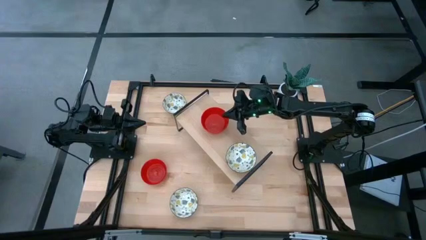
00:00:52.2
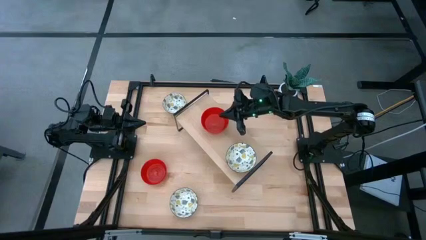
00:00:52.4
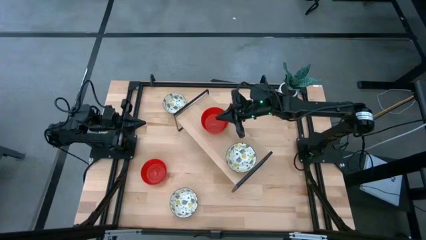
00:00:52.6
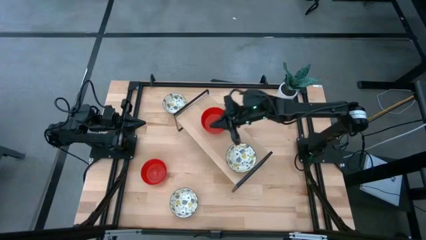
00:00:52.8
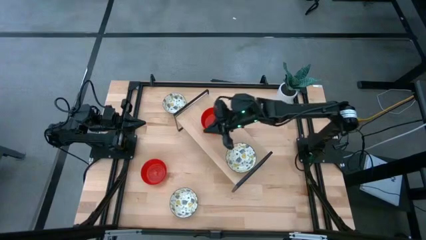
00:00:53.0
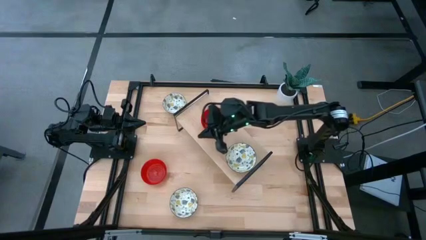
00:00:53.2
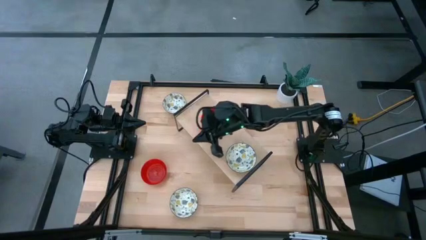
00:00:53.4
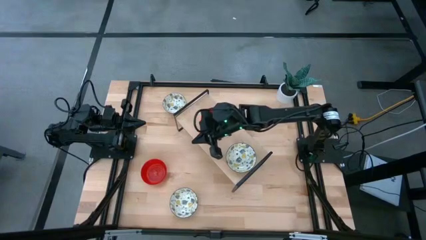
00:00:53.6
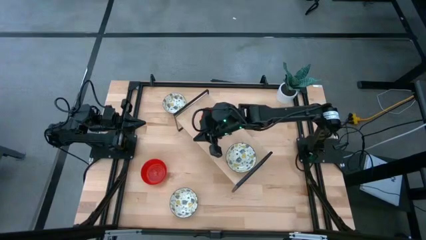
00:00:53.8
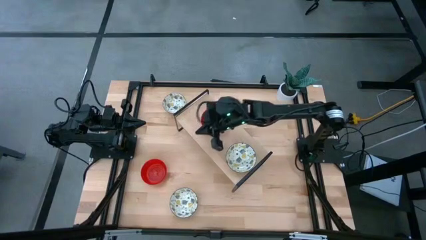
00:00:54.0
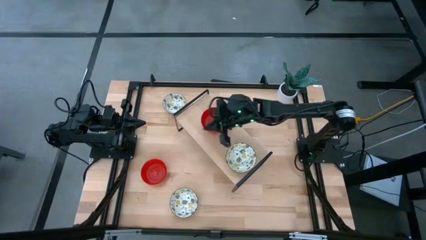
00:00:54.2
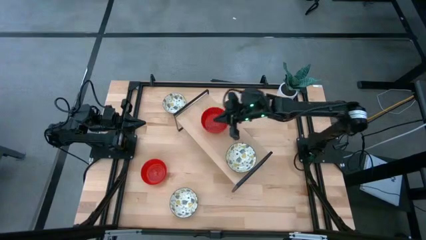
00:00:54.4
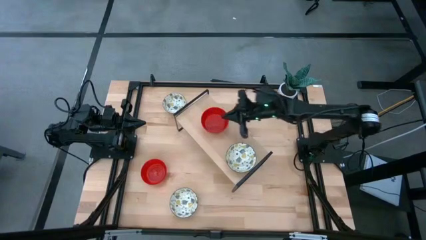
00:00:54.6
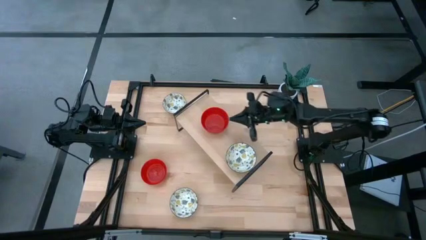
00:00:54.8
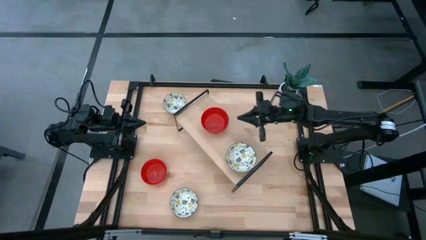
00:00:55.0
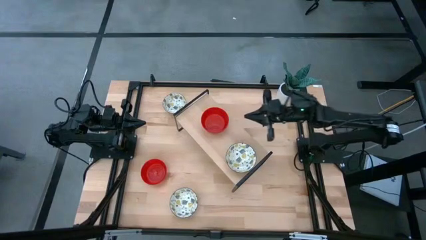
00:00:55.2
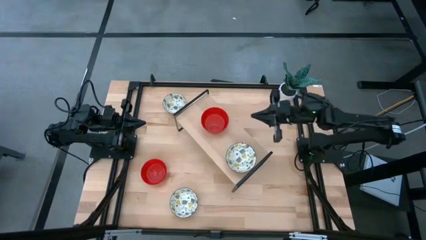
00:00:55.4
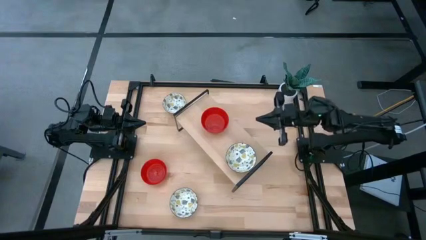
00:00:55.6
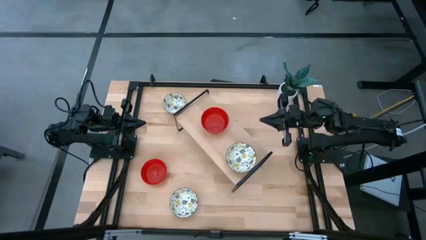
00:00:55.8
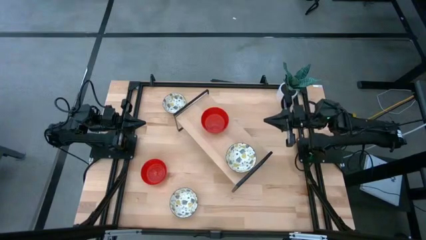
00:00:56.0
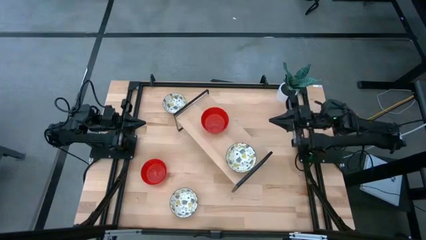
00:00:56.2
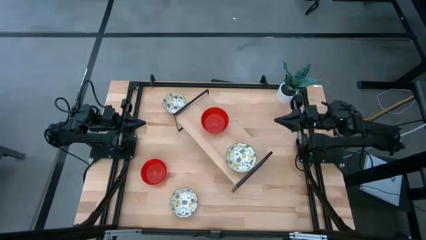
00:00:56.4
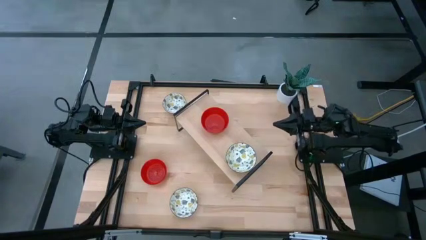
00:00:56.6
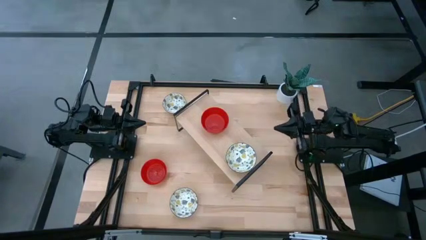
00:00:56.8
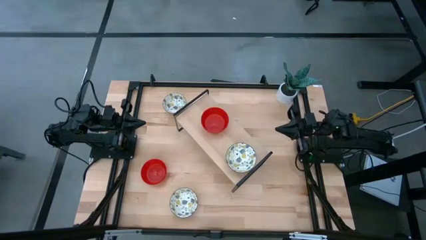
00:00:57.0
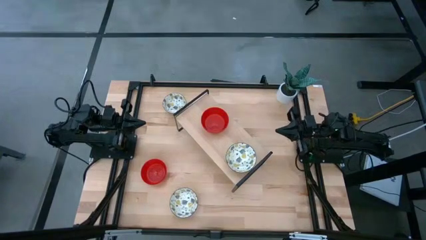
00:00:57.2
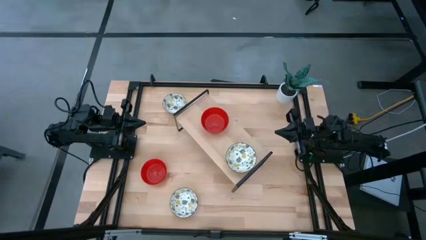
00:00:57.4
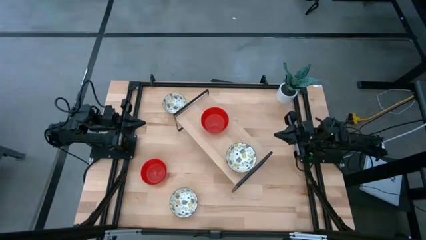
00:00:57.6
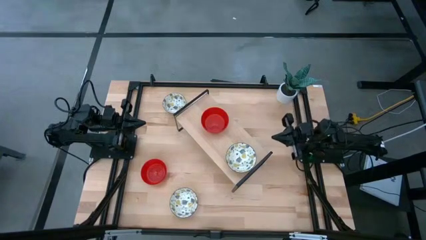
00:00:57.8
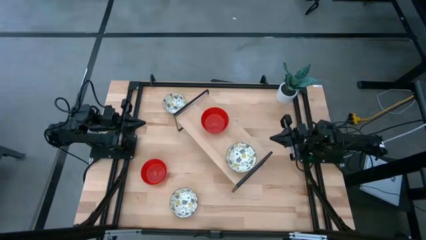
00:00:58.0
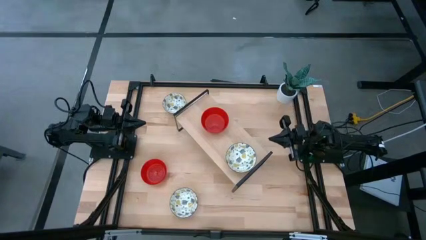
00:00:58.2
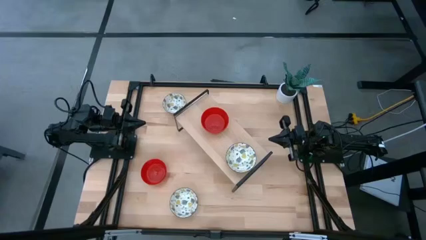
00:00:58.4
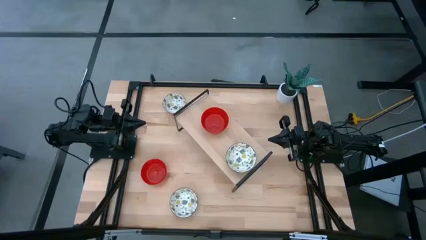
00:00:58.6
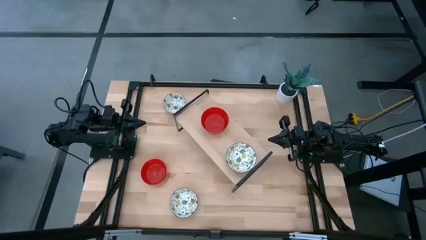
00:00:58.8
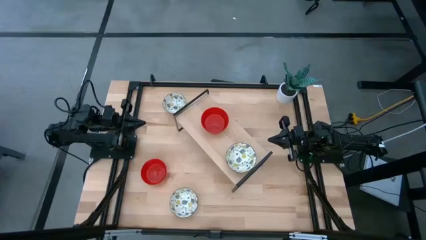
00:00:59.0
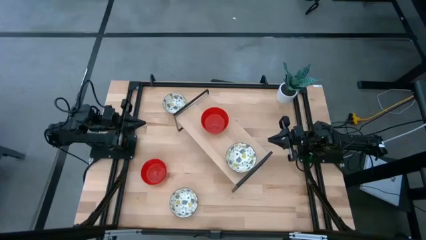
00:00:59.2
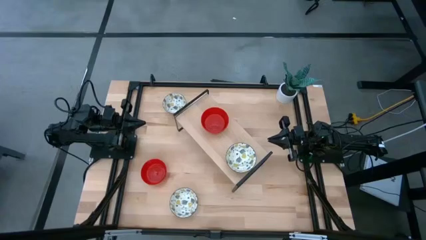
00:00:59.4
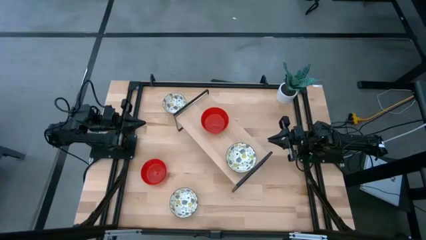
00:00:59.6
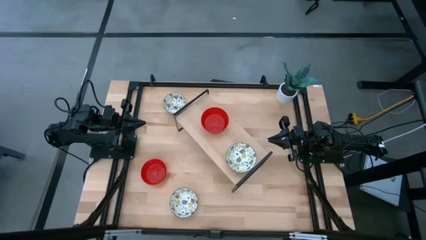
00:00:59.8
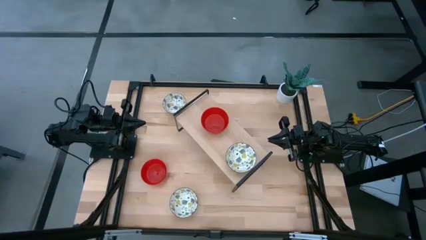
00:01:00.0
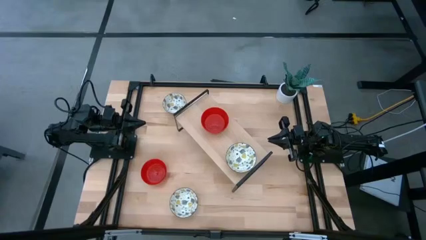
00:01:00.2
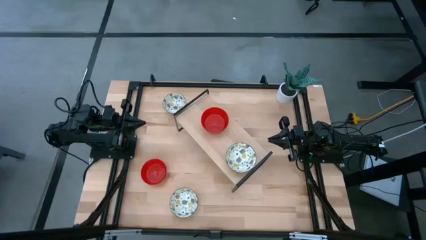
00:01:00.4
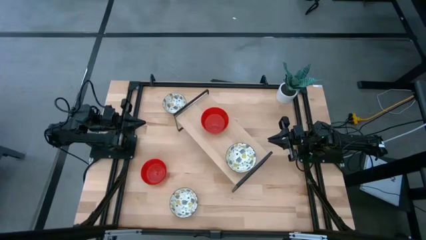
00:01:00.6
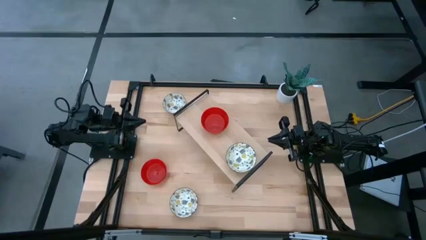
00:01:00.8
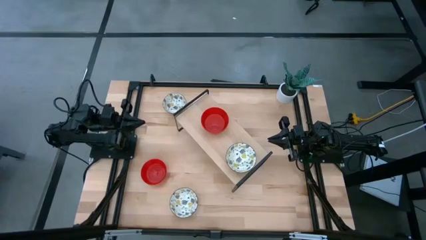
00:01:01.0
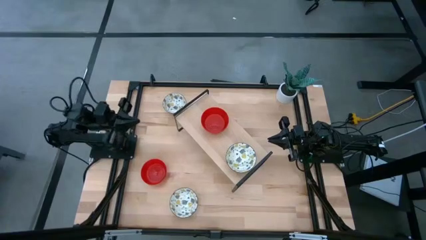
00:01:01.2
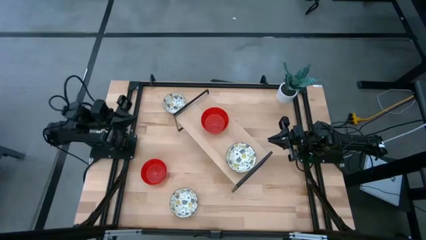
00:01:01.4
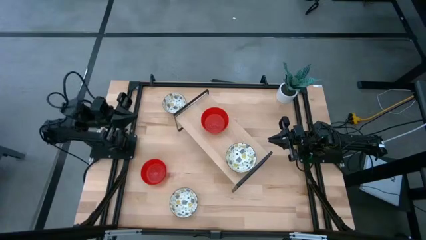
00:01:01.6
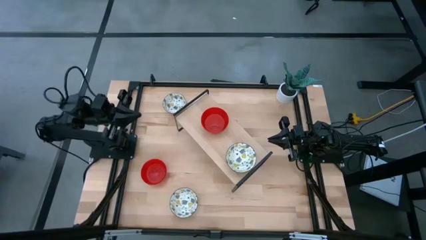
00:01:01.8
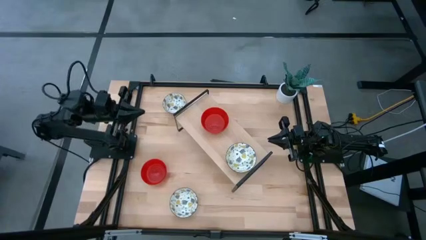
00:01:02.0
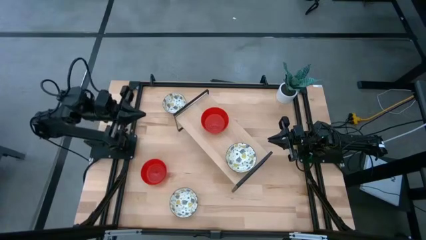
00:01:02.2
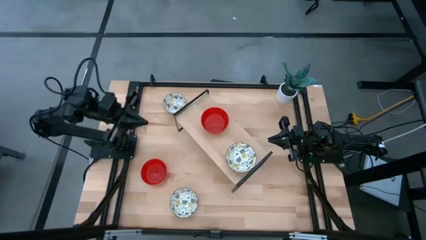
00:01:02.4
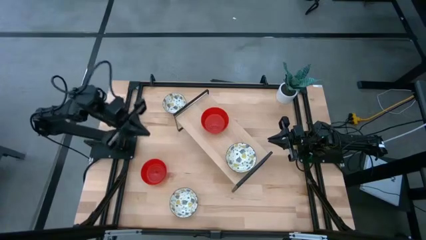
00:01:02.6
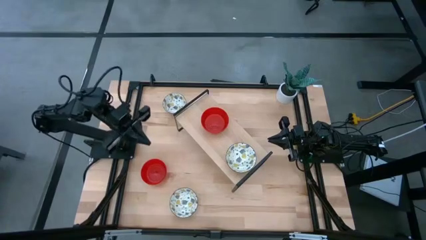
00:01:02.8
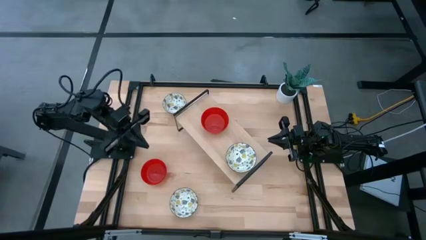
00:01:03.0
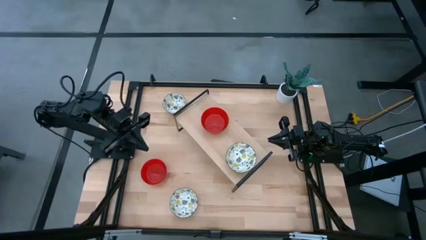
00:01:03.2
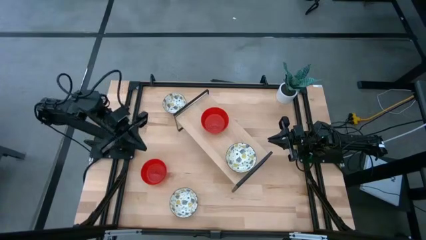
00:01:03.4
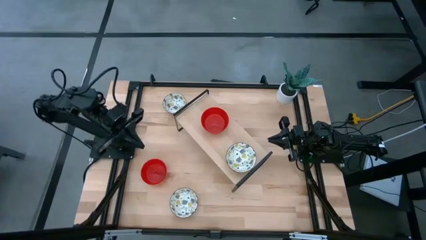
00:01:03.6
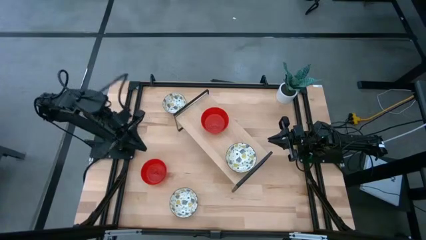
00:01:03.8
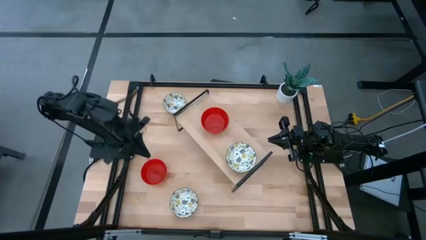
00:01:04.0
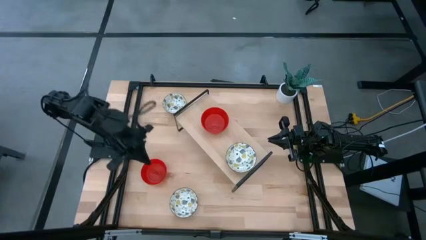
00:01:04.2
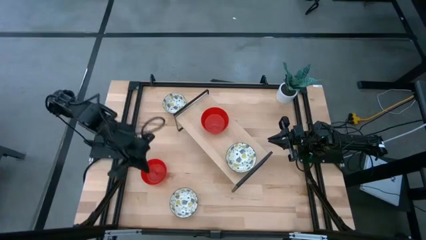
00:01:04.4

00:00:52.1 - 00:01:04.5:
Task: Pick & Place Mini bowls
Stack the red bowl on top of the red bowls on the shelf

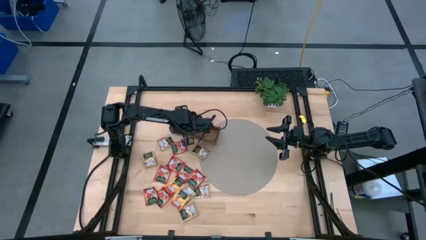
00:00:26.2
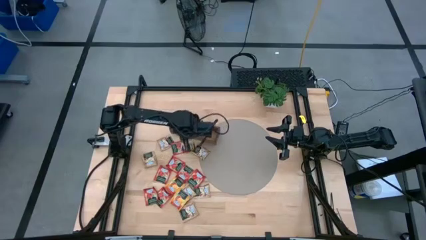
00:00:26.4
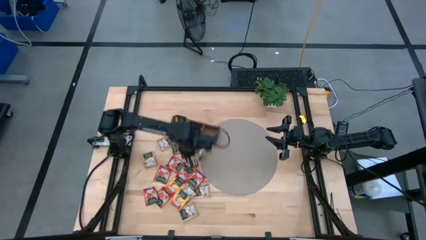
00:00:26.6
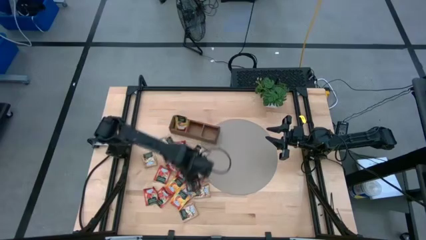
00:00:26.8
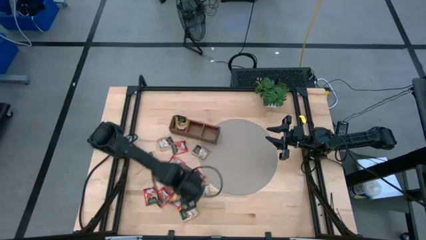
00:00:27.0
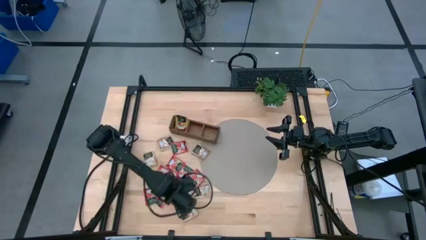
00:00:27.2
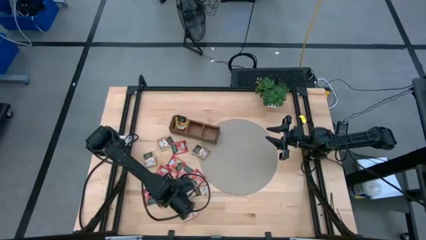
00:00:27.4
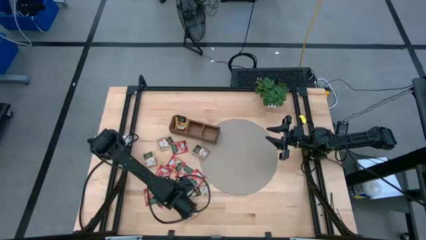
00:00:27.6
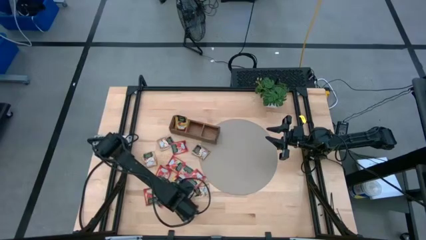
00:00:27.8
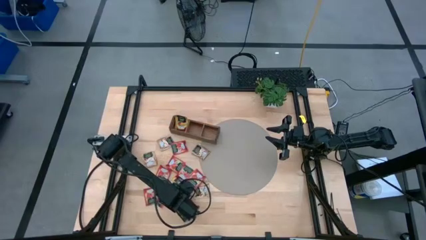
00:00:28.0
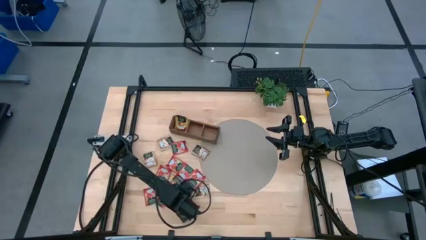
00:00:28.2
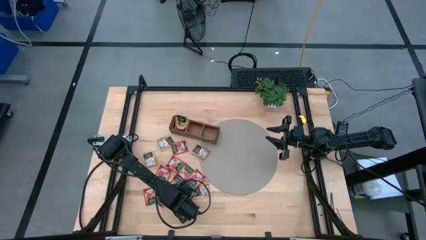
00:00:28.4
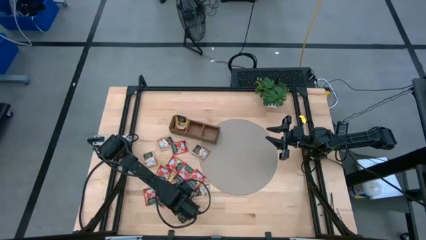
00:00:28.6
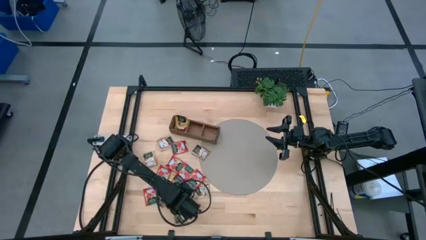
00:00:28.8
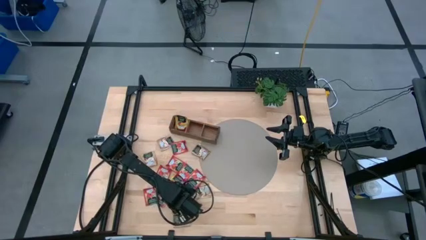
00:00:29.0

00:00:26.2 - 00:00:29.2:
Task: Pick & Place Tea
Put the yellow tea bag into the left section of the wooden organizer
